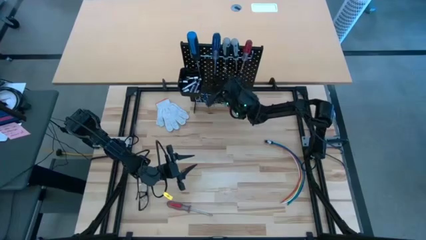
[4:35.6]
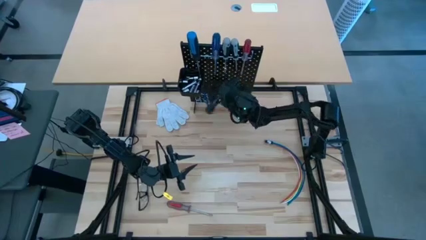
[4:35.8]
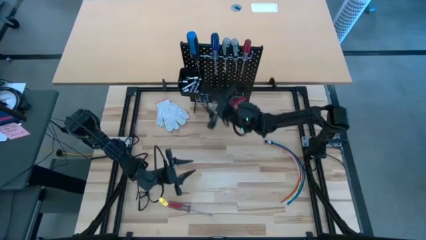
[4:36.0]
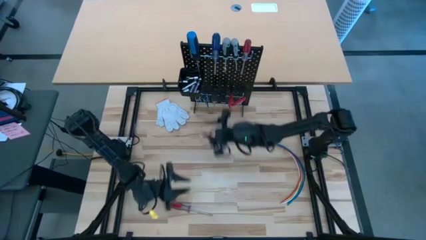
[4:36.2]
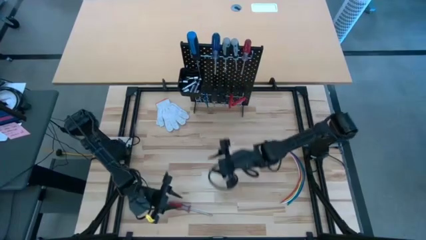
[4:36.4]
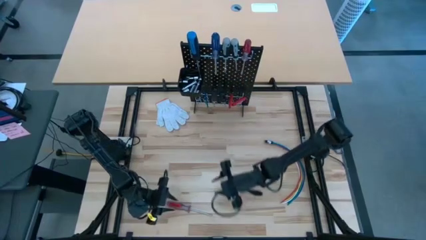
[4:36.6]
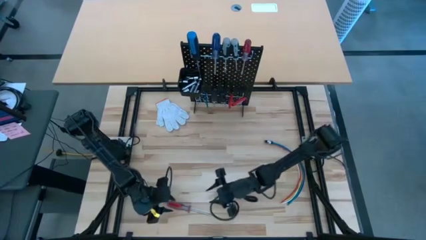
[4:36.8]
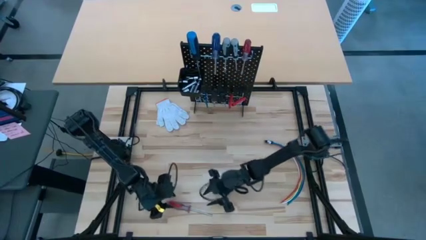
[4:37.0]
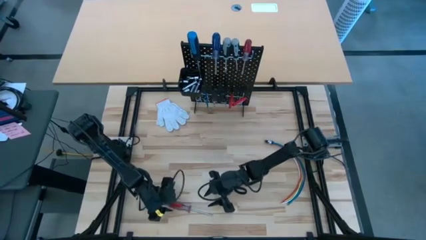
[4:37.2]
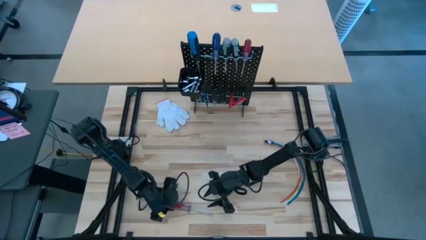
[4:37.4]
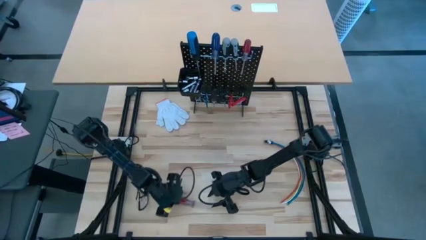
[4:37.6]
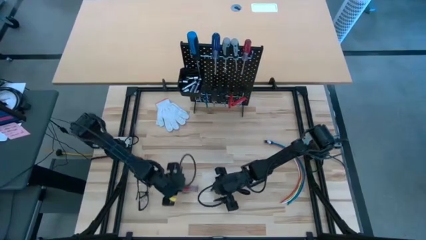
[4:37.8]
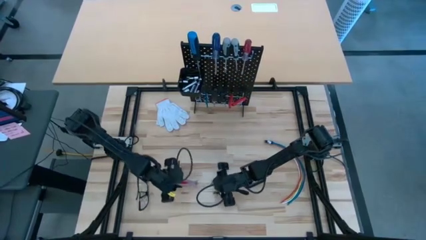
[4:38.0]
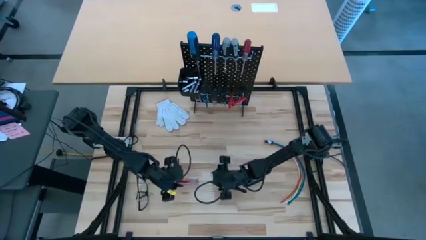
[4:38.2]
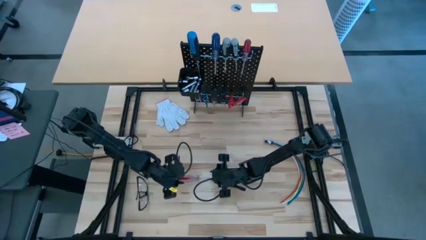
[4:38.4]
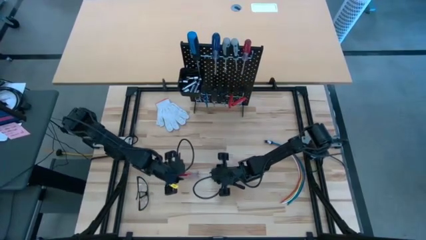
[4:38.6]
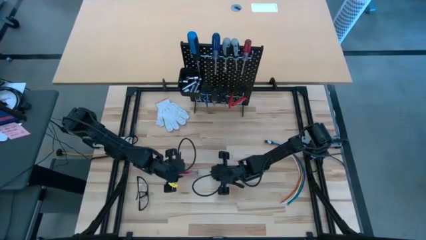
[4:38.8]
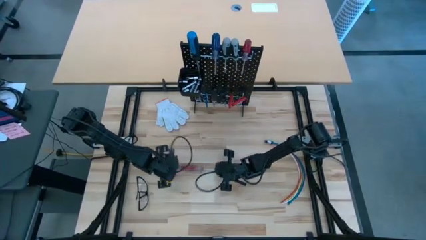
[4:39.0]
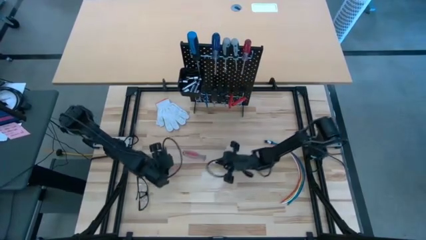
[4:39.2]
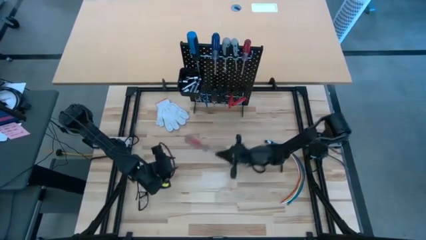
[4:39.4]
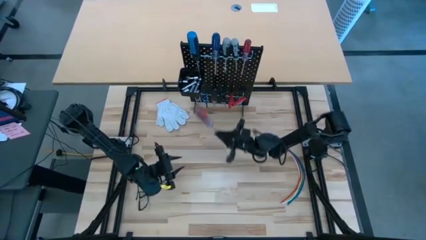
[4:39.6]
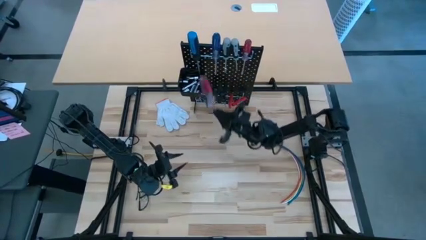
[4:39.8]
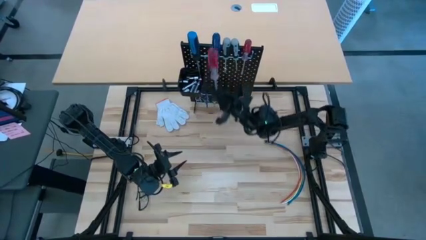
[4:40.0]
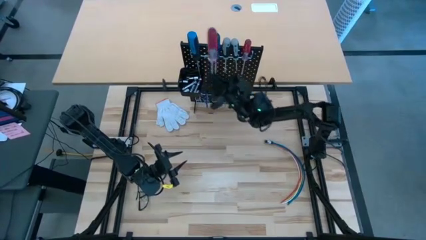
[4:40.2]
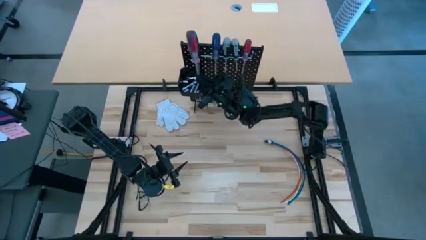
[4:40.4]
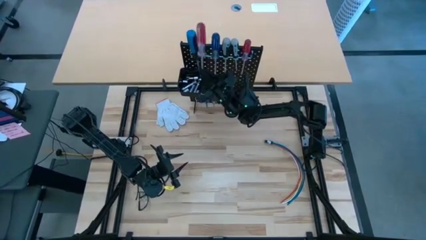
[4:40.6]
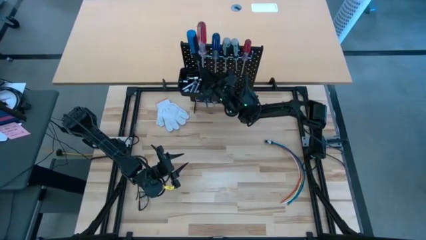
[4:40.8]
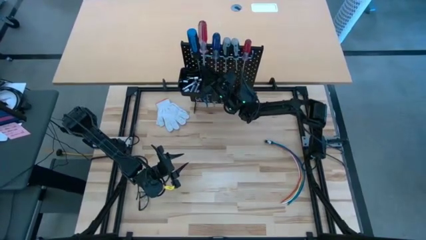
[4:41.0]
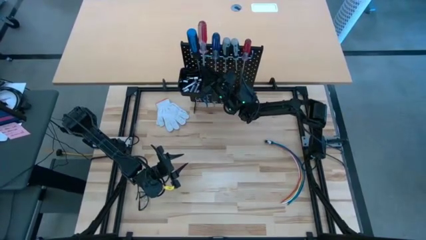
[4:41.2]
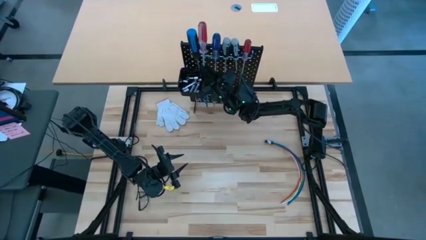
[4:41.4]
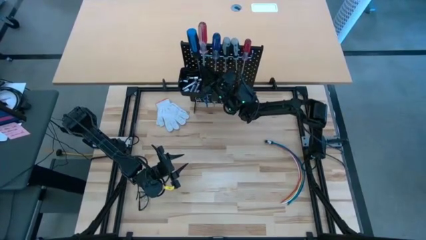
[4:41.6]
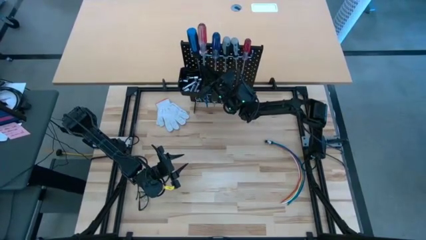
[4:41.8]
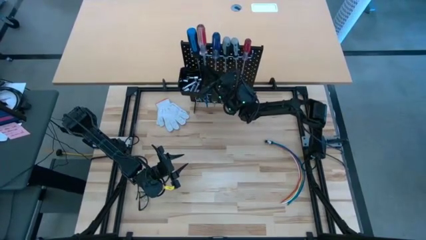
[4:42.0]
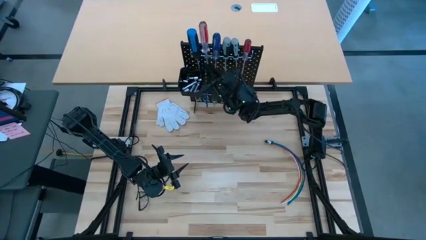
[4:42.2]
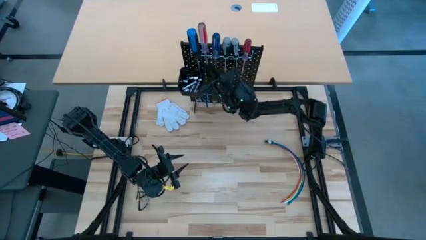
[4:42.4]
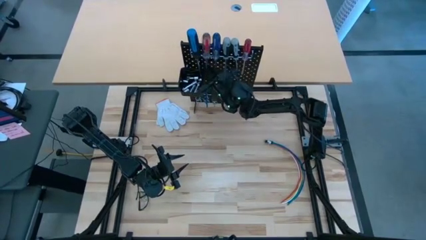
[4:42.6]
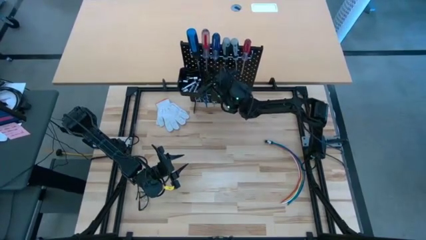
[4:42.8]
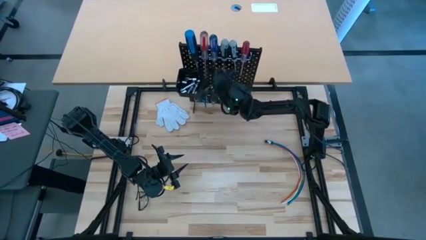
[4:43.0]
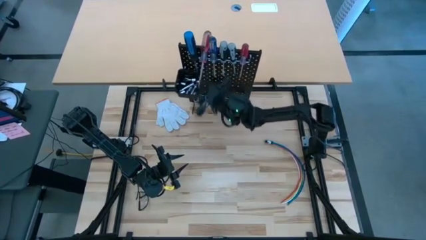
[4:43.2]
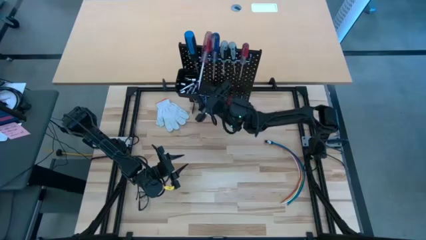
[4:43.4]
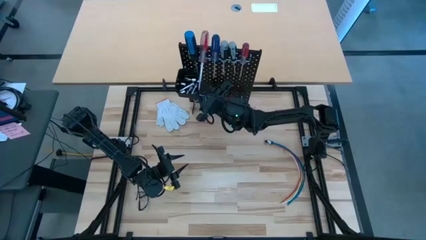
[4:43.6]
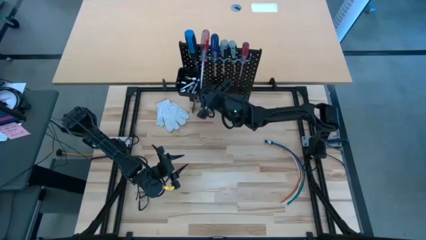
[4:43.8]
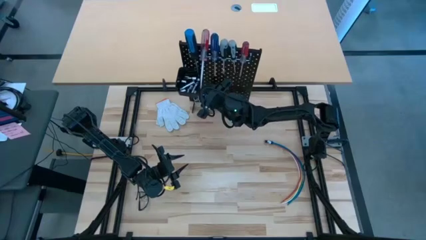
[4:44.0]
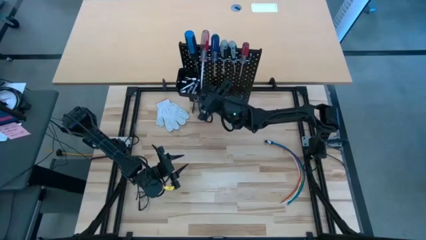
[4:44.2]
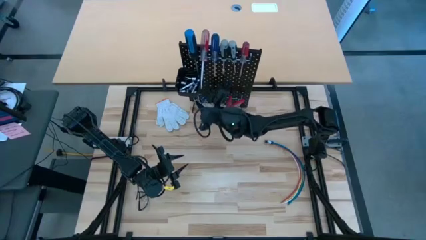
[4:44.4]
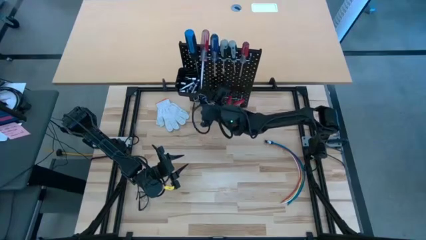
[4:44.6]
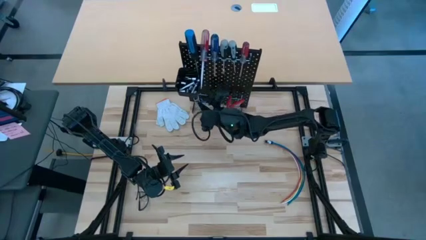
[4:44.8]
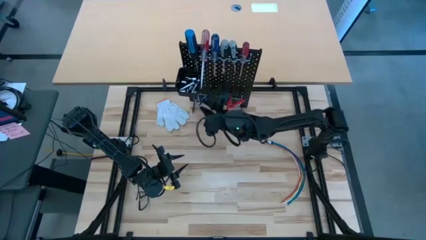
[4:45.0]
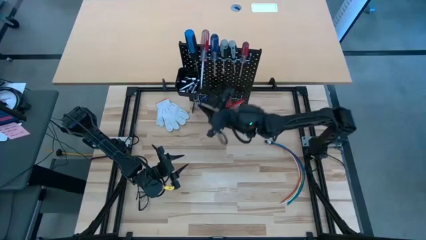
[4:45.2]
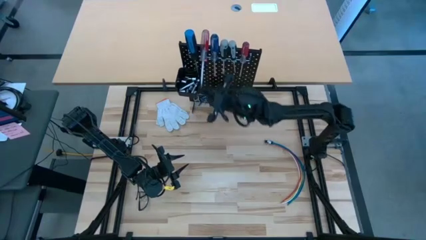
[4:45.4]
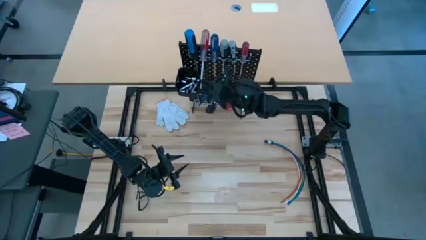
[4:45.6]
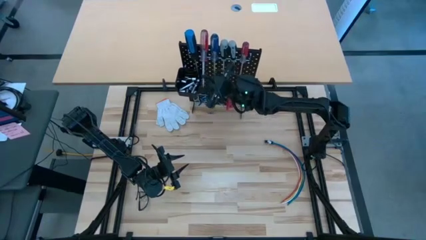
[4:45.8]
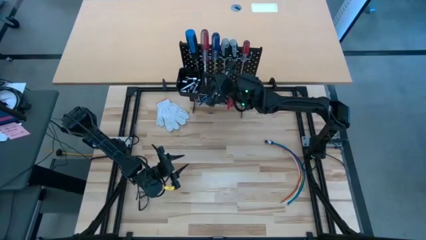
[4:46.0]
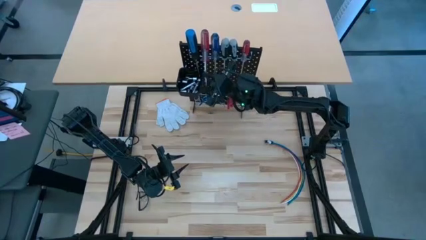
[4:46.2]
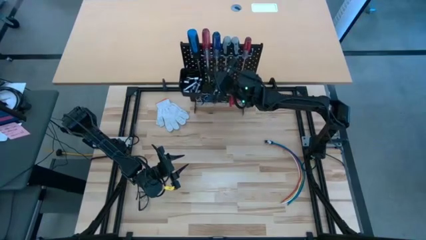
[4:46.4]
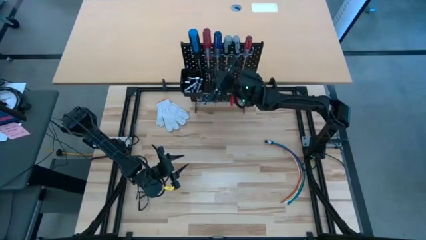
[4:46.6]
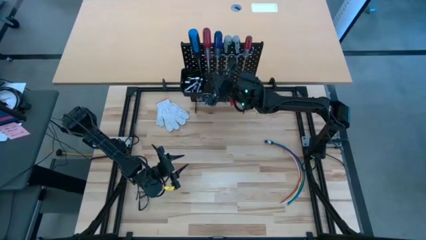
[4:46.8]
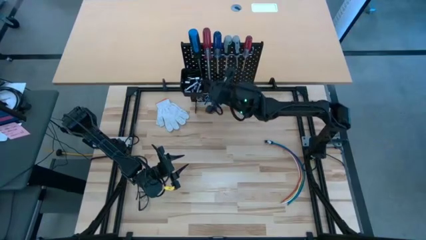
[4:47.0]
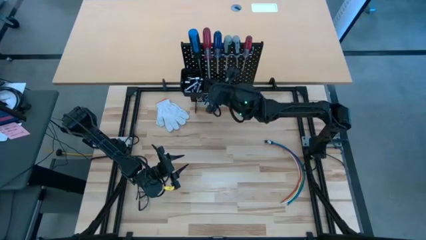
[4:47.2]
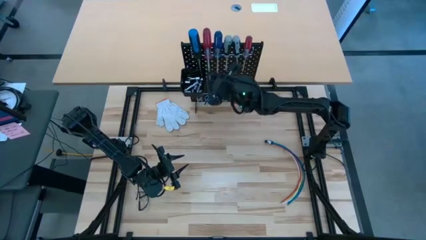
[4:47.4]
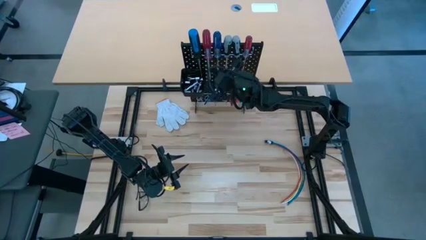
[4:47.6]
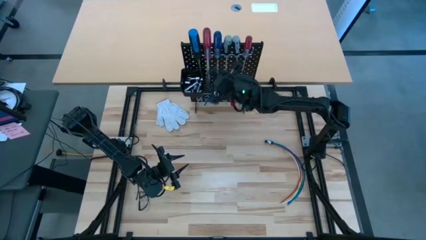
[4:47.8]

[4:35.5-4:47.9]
Task: Hang tools onto peg board
Hang the red transparent screwdriver on the pegboard

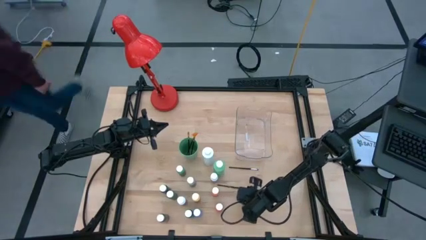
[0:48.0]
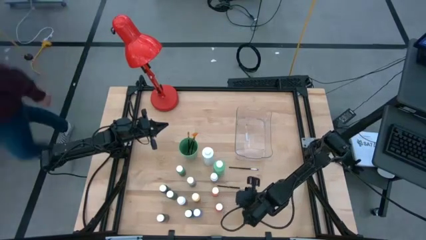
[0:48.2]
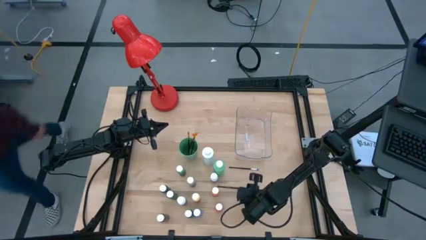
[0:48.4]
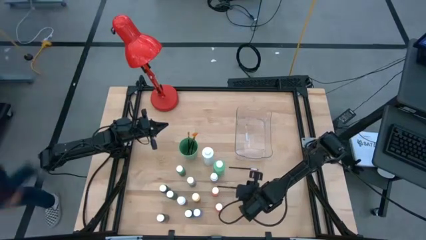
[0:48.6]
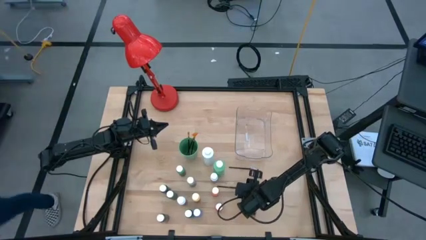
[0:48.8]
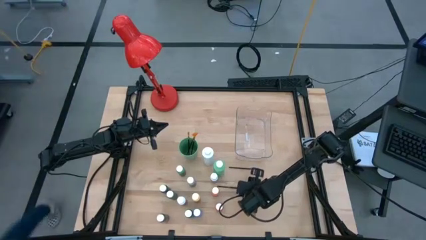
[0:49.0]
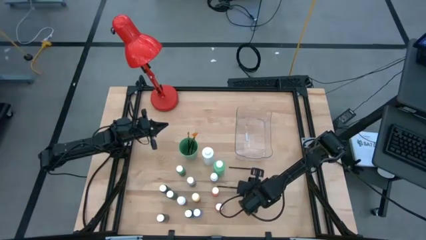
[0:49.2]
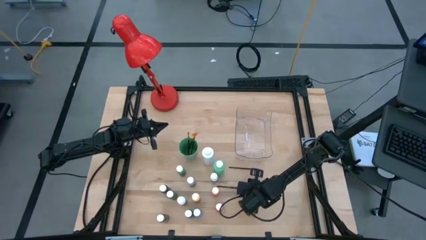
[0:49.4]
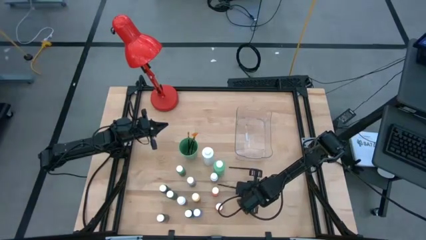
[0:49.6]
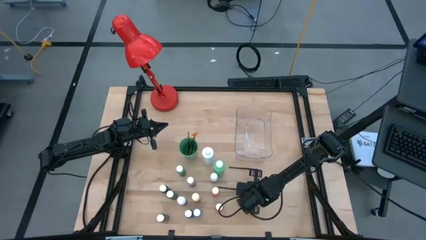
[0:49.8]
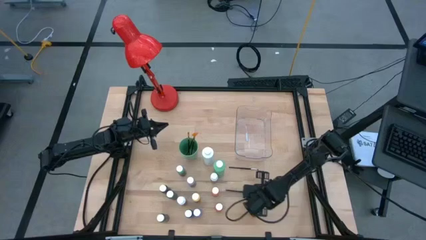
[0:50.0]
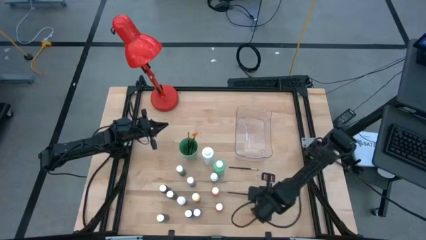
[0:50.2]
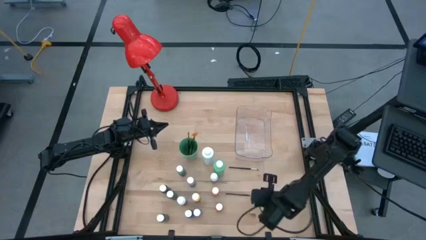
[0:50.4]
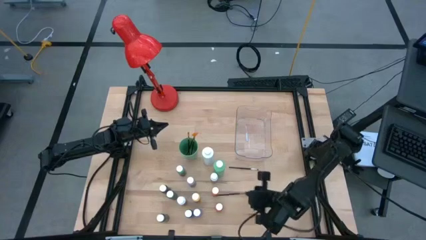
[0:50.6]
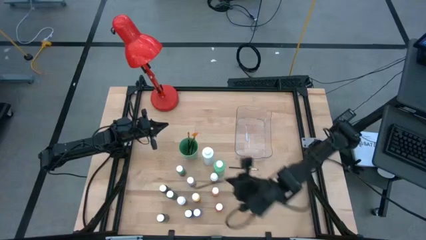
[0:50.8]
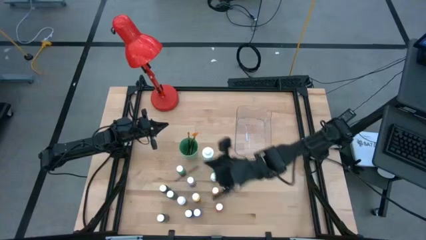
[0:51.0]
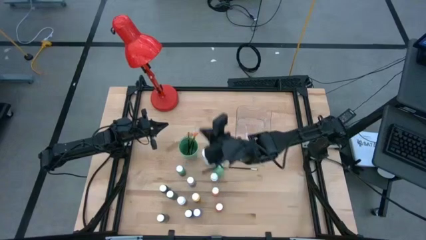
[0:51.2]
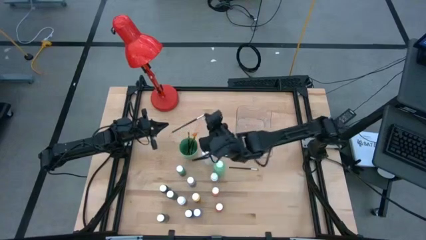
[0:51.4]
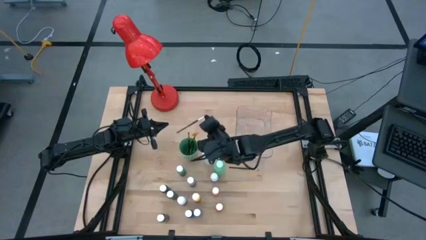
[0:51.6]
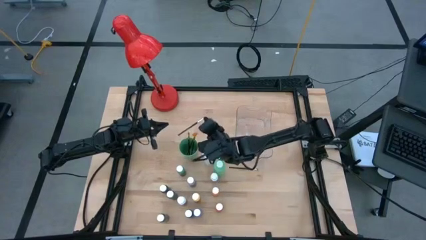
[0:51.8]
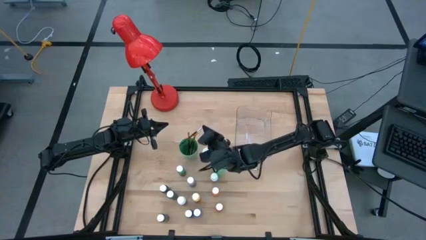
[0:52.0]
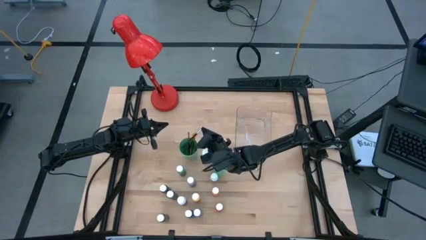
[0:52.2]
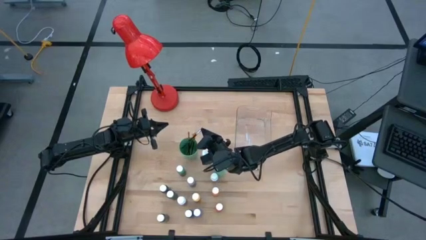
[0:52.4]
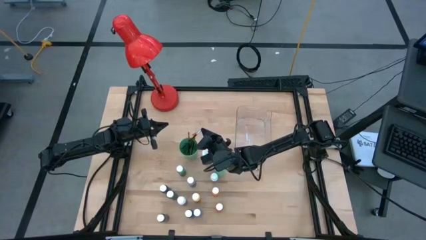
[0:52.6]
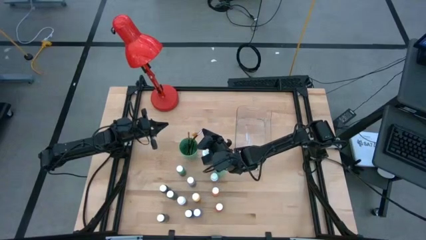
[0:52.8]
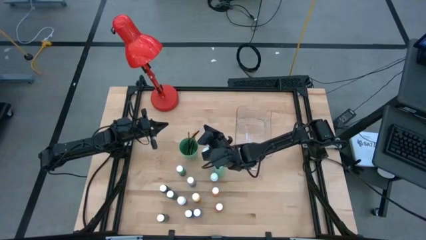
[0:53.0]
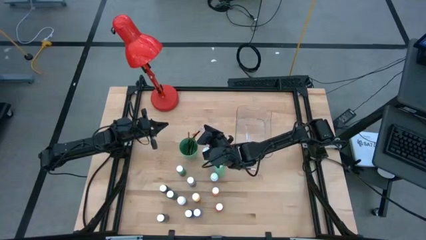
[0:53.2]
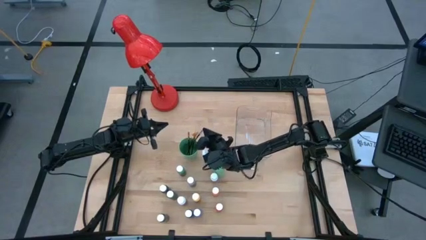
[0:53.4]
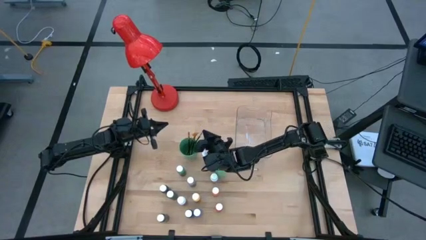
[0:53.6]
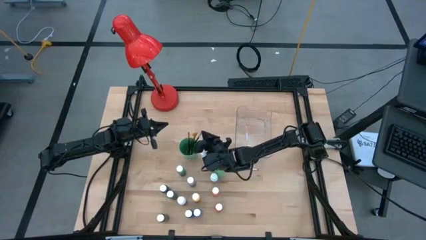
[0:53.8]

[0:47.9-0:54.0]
Task: Pick & Place Paint Supplies
Put the bottom silver paintbrush into the green cup
